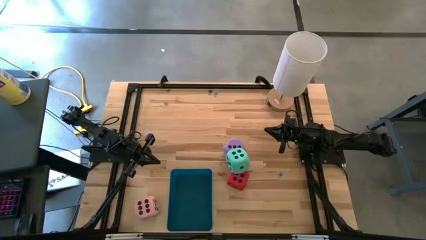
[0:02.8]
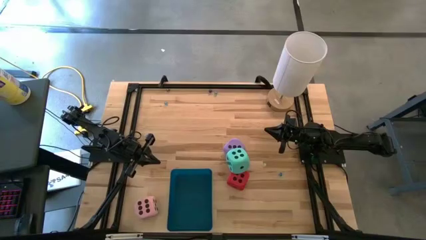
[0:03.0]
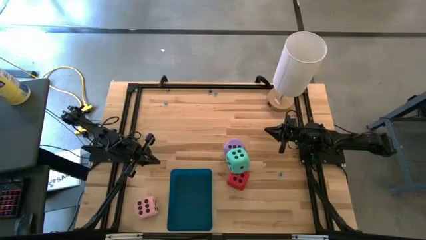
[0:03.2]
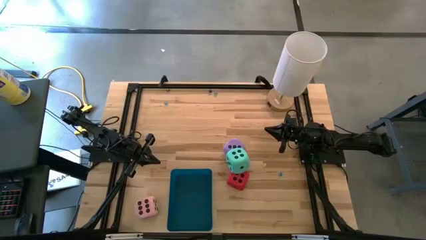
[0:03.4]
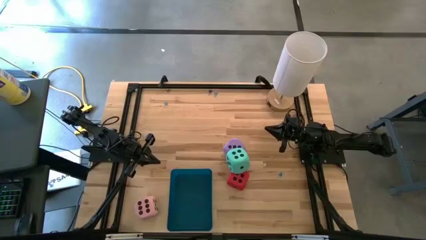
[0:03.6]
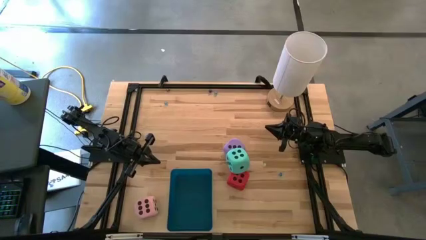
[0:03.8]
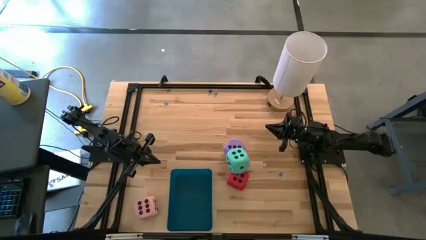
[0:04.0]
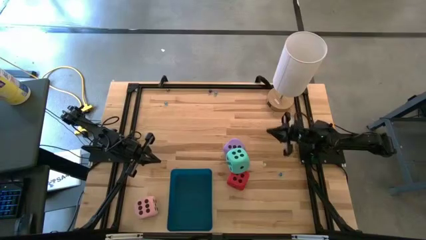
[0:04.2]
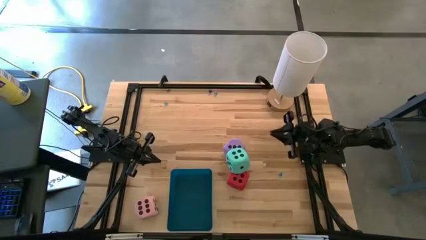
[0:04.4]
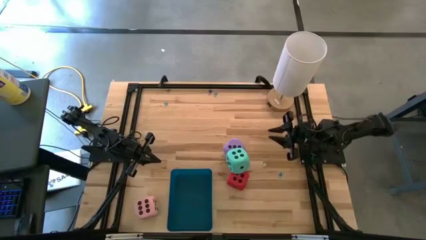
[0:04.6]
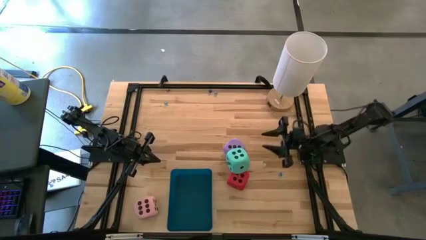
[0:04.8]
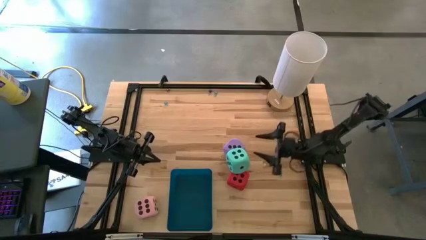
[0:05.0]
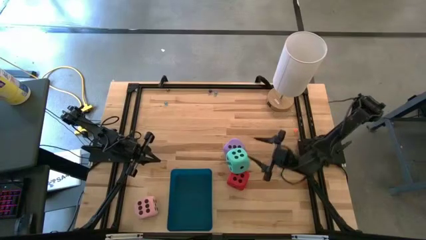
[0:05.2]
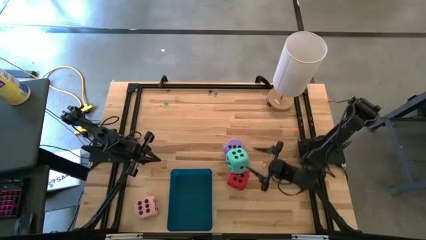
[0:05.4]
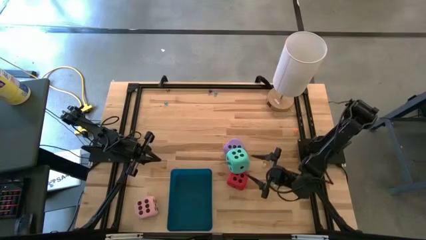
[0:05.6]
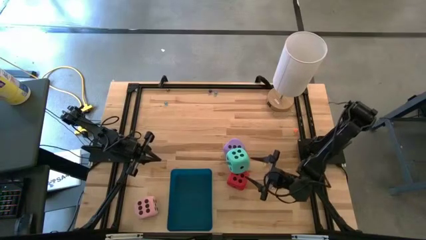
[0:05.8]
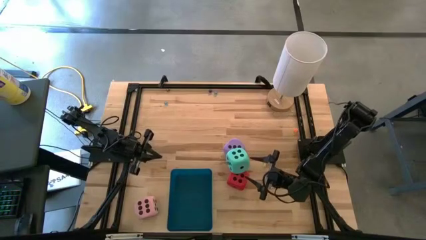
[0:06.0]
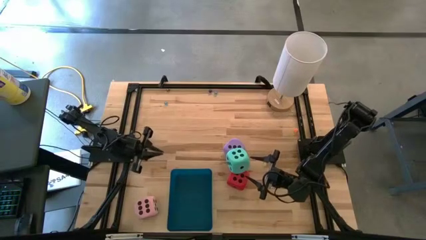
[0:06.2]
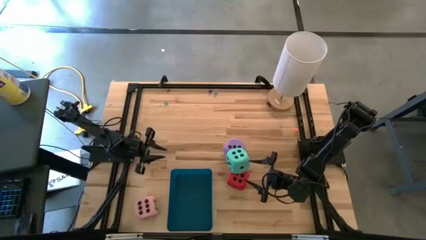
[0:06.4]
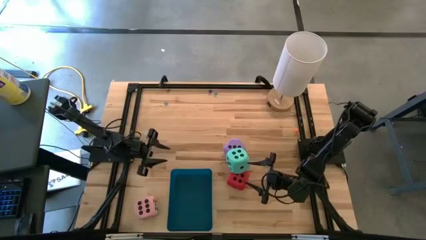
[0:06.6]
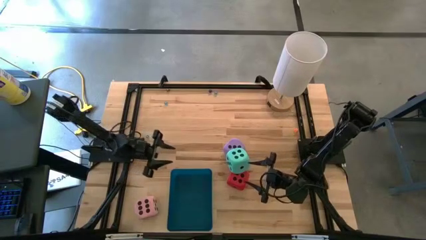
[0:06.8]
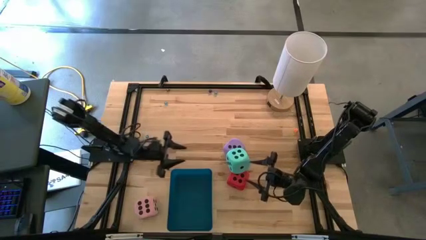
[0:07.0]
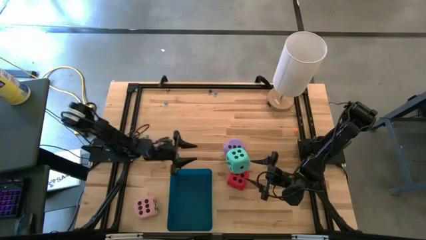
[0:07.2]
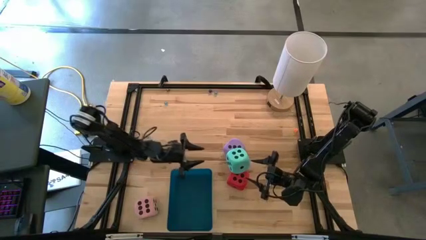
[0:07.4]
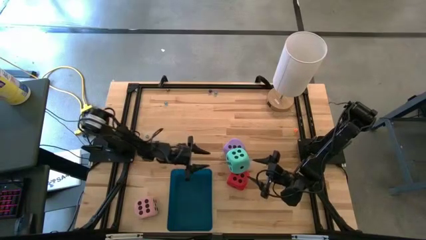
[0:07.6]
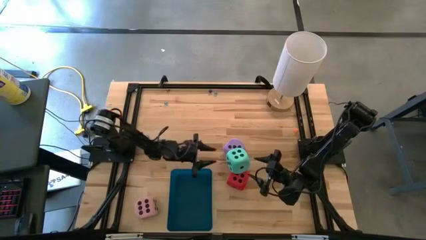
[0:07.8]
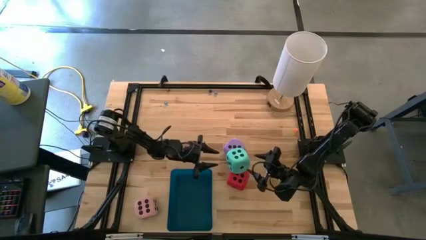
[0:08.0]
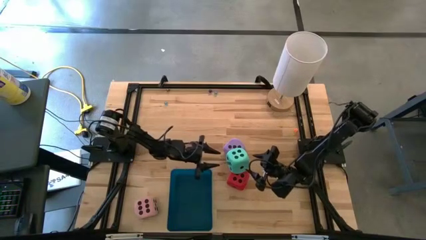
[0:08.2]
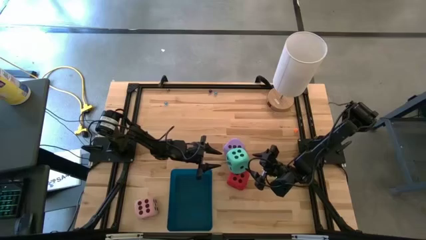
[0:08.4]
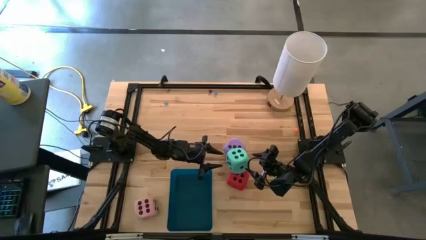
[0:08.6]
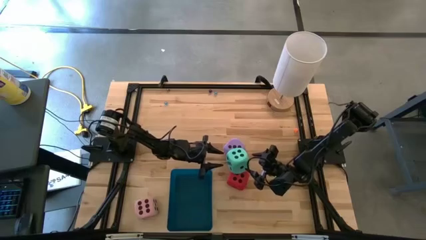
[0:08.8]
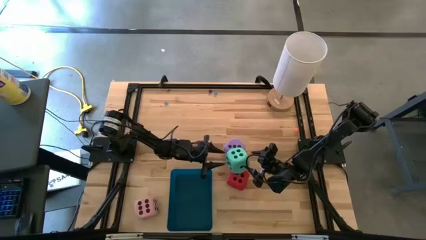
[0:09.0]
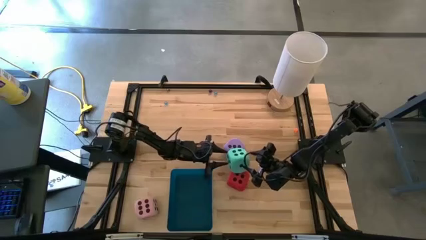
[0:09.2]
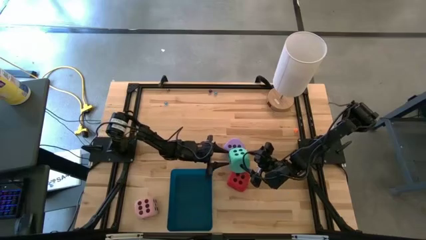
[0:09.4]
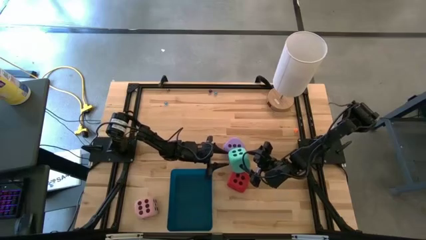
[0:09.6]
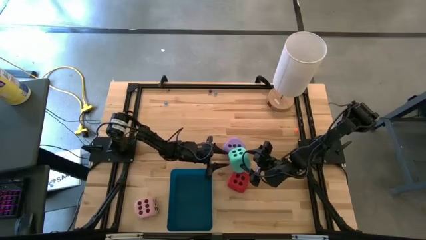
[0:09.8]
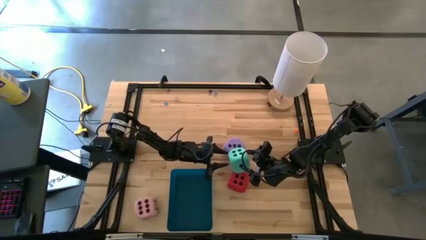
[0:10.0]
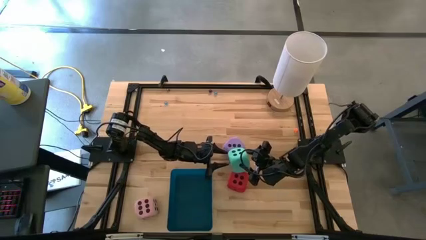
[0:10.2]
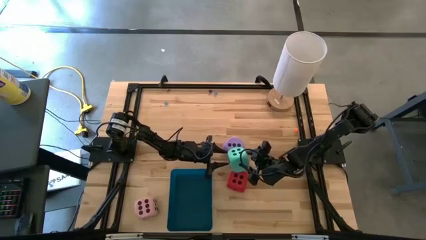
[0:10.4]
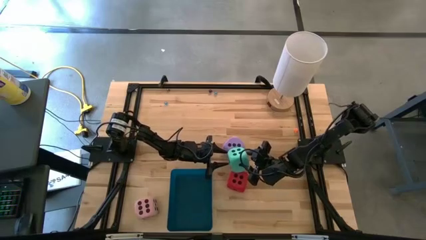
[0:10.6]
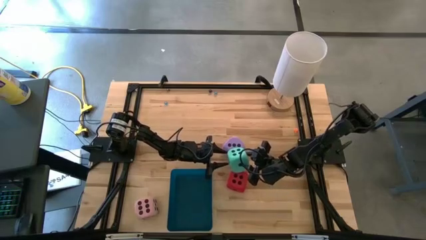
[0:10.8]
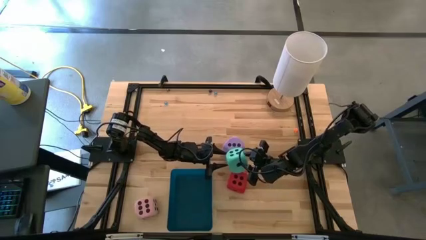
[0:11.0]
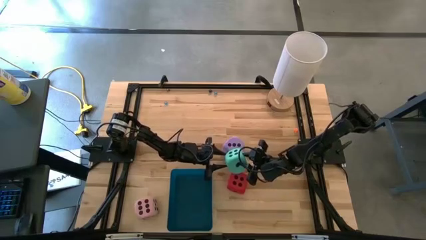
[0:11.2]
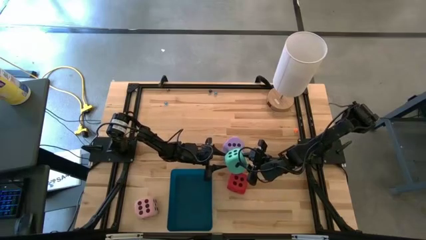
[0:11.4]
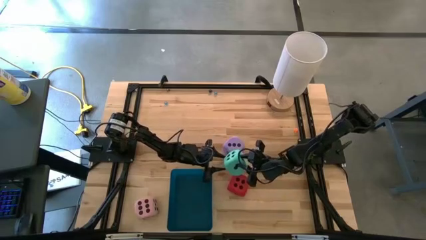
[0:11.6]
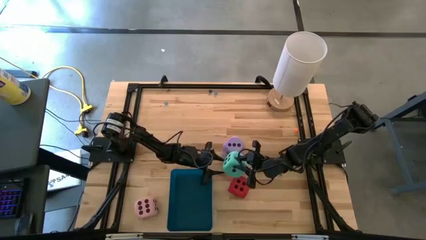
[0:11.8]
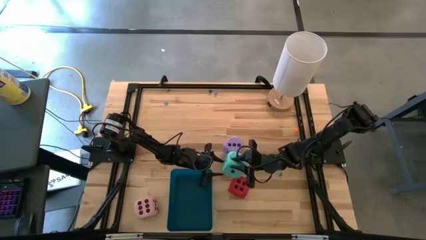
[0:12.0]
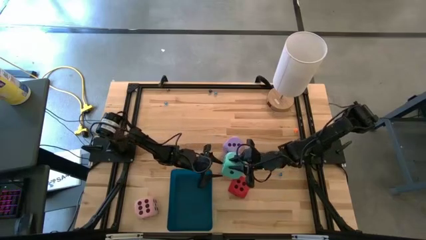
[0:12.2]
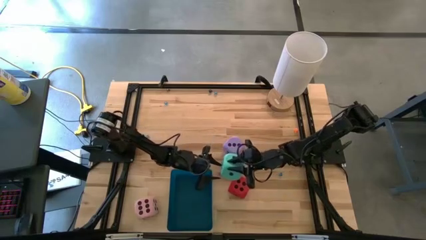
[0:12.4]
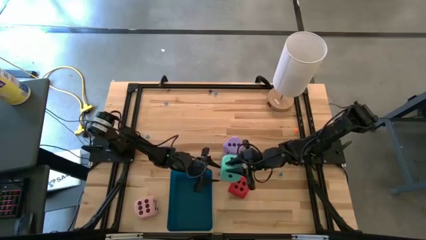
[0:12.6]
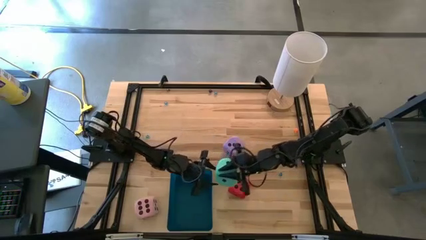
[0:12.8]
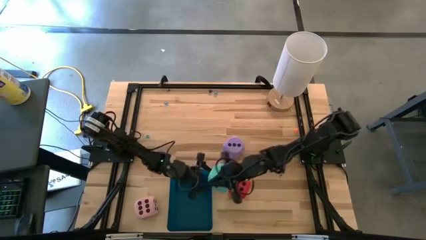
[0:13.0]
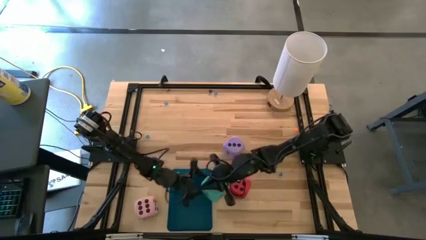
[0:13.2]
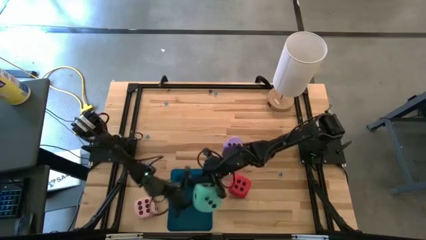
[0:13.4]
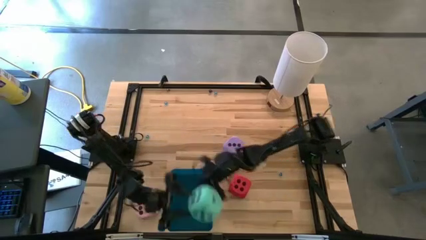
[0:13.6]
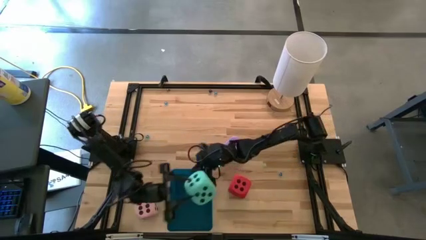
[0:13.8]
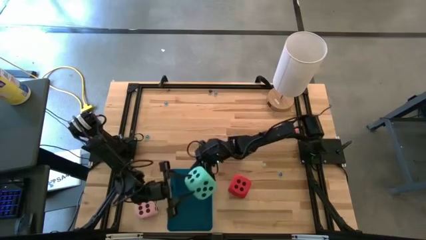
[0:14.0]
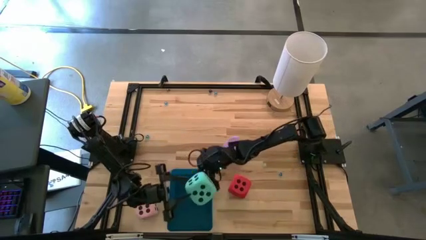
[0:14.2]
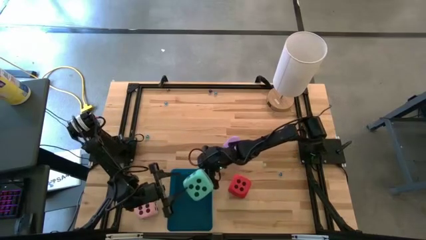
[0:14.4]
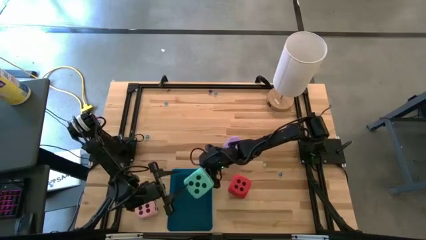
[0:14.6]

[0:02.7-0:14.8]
Task: Pick & Place Dice
Put the big green die into the blue bin
